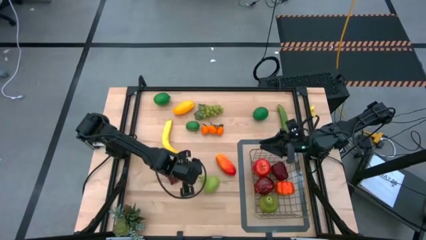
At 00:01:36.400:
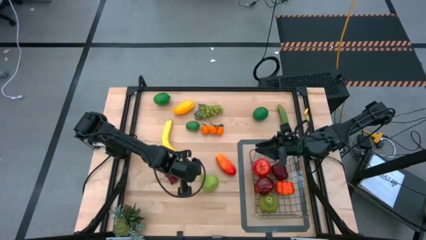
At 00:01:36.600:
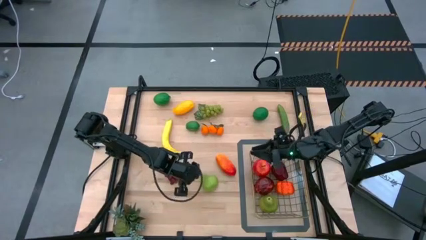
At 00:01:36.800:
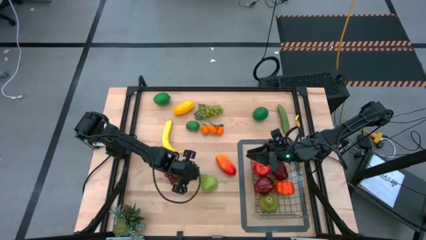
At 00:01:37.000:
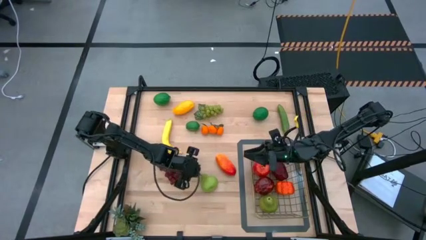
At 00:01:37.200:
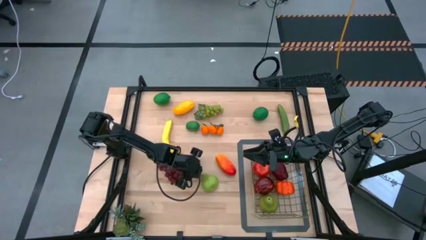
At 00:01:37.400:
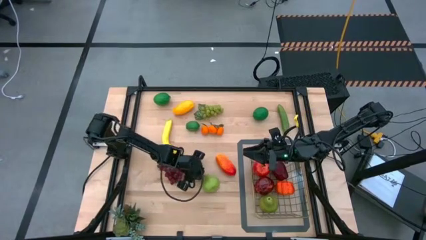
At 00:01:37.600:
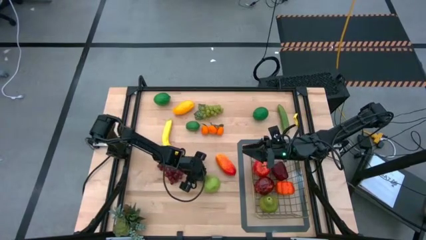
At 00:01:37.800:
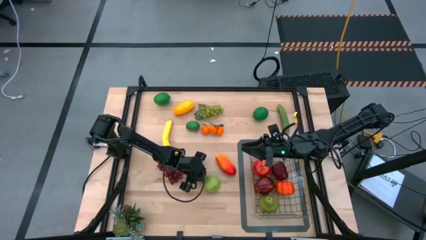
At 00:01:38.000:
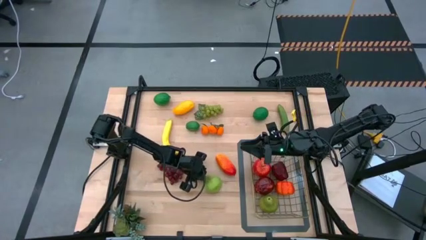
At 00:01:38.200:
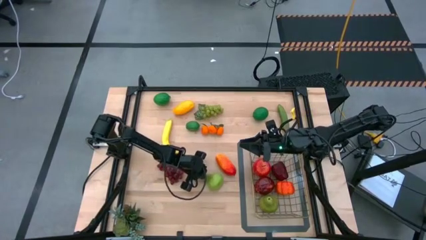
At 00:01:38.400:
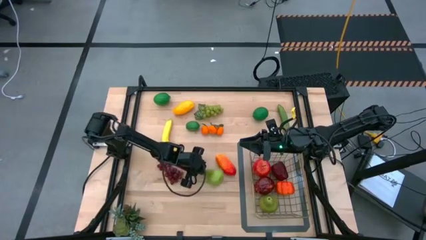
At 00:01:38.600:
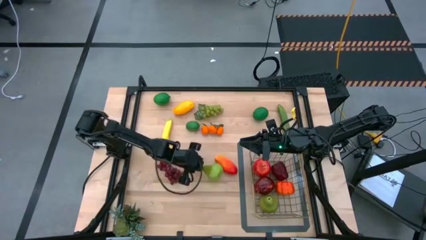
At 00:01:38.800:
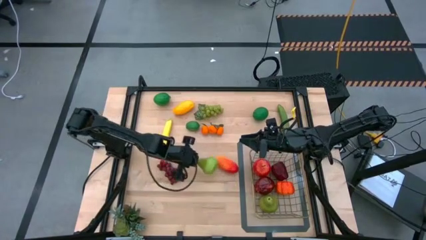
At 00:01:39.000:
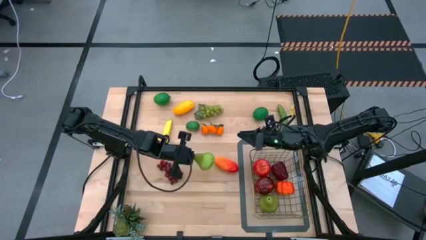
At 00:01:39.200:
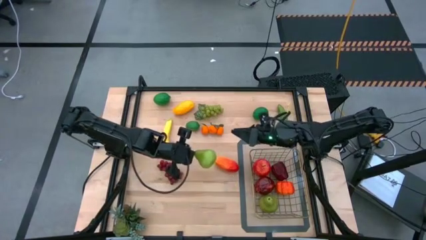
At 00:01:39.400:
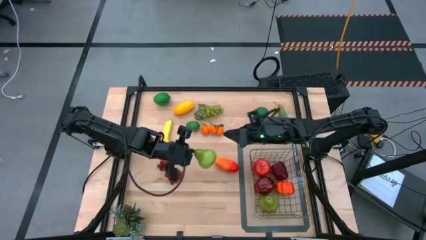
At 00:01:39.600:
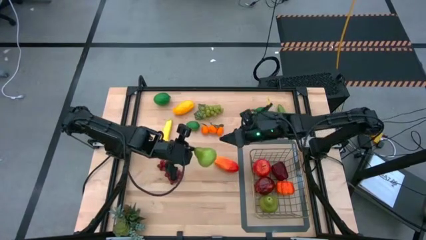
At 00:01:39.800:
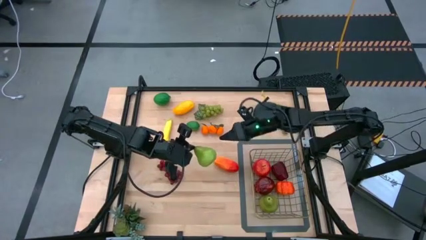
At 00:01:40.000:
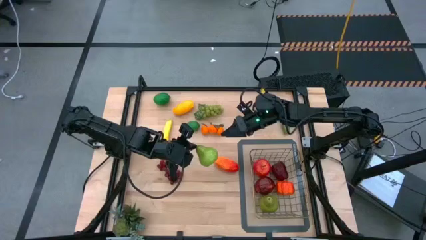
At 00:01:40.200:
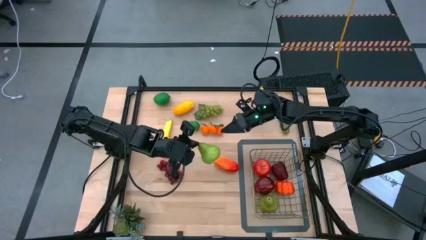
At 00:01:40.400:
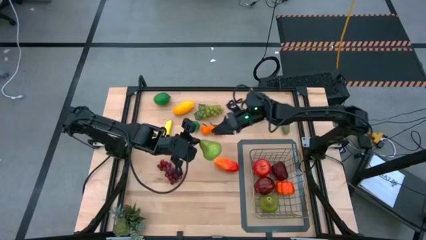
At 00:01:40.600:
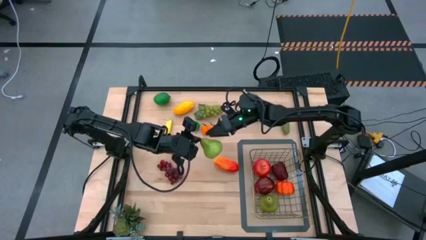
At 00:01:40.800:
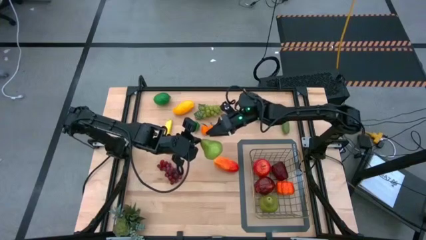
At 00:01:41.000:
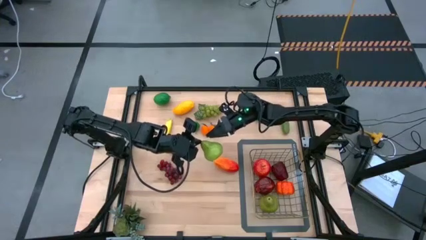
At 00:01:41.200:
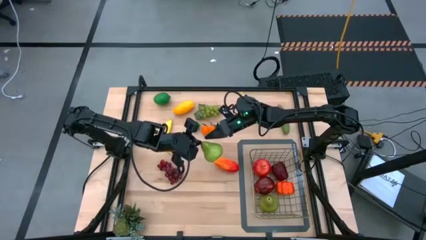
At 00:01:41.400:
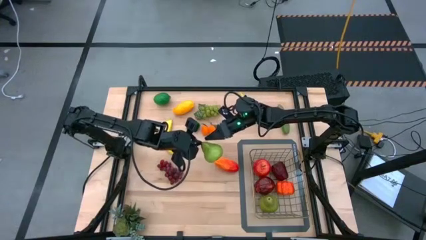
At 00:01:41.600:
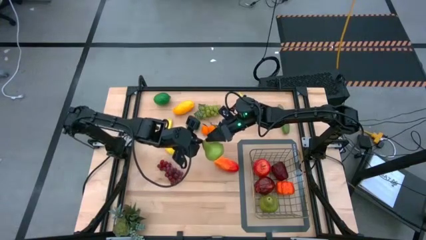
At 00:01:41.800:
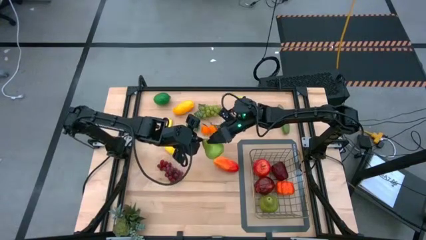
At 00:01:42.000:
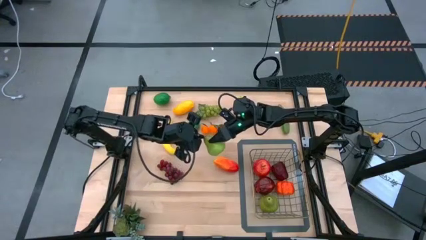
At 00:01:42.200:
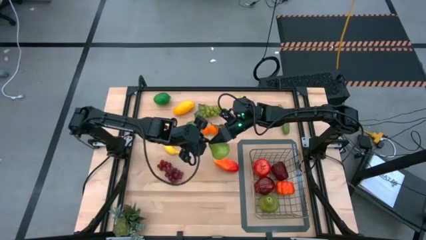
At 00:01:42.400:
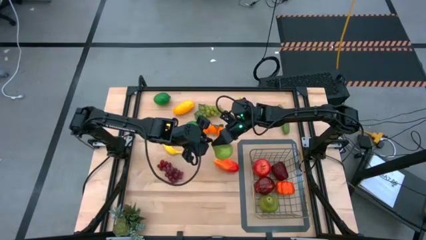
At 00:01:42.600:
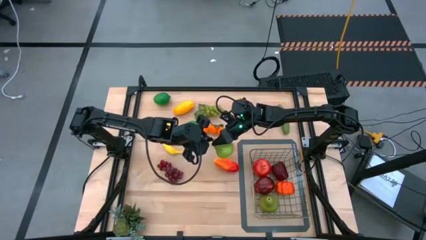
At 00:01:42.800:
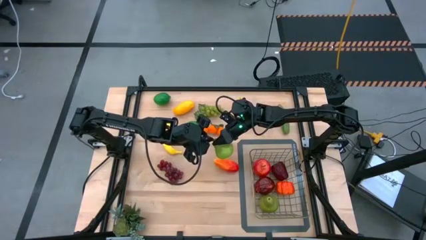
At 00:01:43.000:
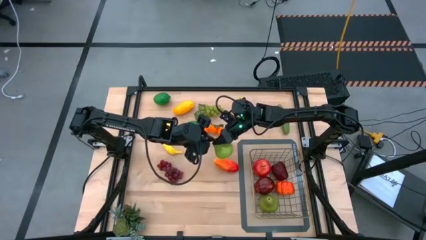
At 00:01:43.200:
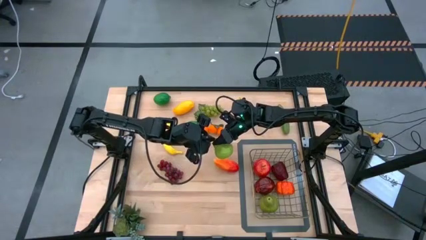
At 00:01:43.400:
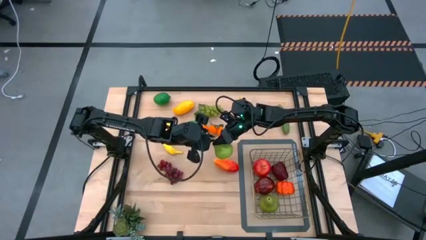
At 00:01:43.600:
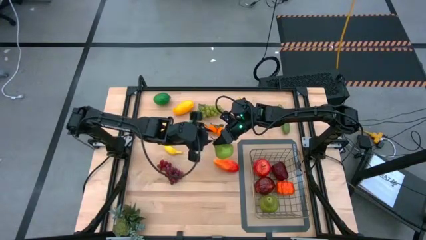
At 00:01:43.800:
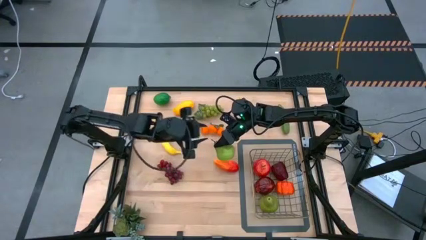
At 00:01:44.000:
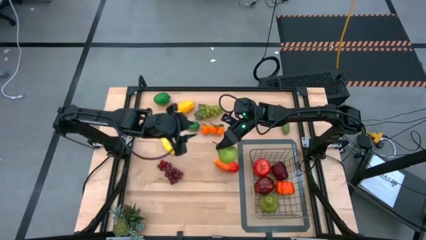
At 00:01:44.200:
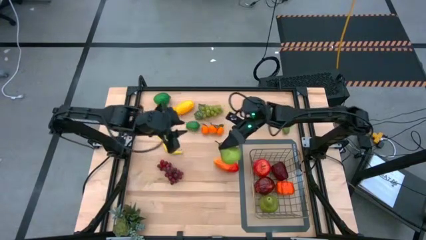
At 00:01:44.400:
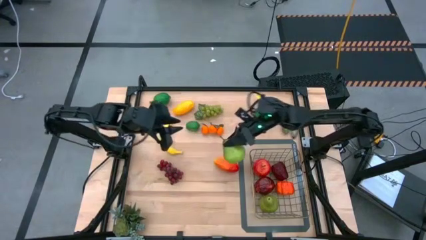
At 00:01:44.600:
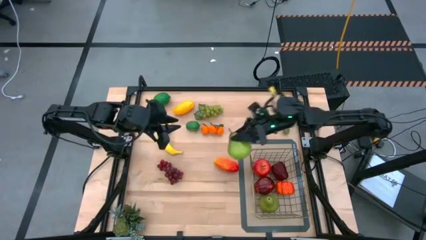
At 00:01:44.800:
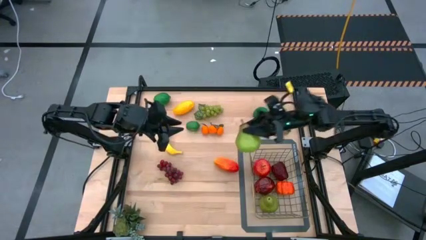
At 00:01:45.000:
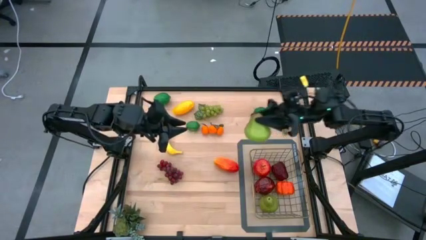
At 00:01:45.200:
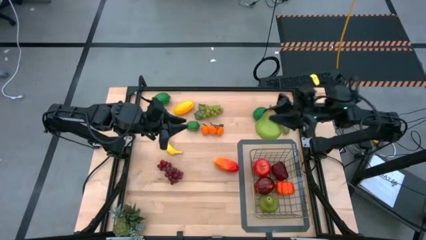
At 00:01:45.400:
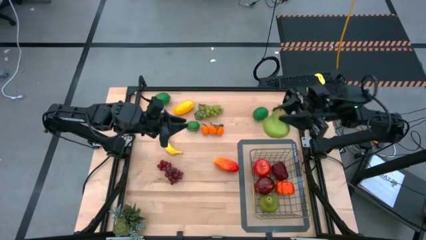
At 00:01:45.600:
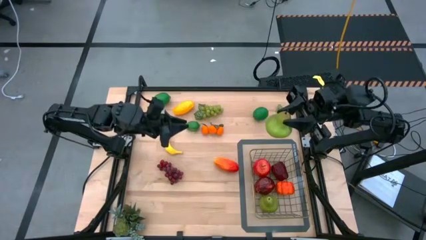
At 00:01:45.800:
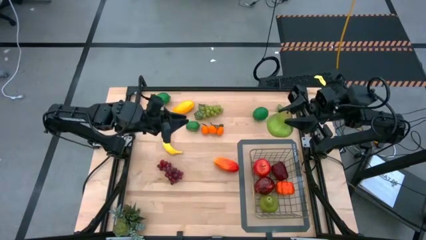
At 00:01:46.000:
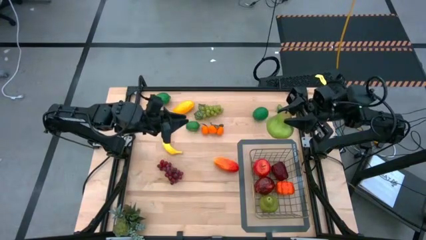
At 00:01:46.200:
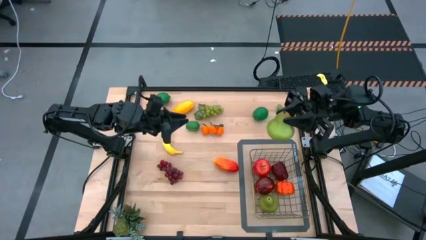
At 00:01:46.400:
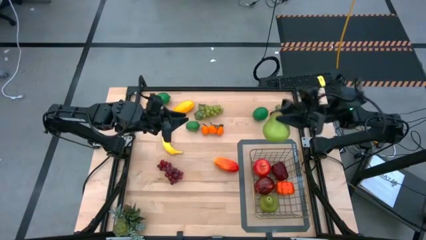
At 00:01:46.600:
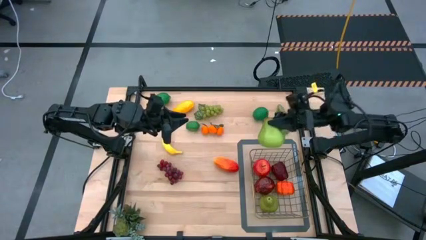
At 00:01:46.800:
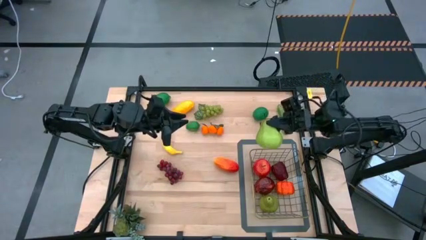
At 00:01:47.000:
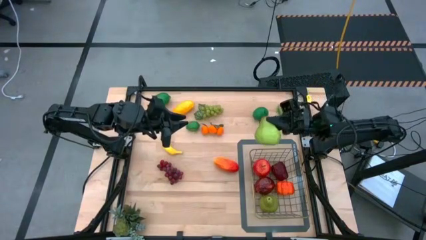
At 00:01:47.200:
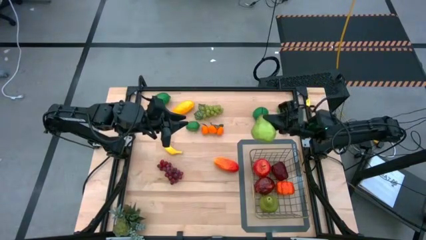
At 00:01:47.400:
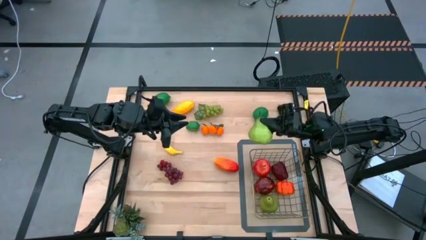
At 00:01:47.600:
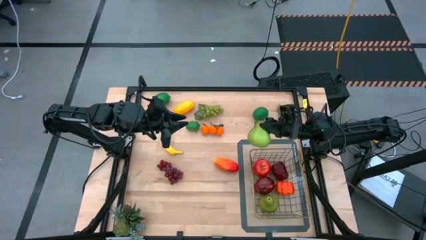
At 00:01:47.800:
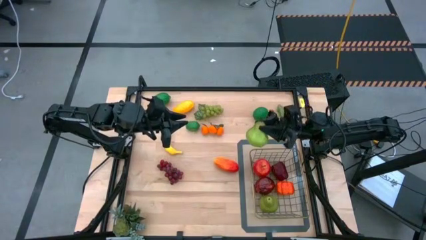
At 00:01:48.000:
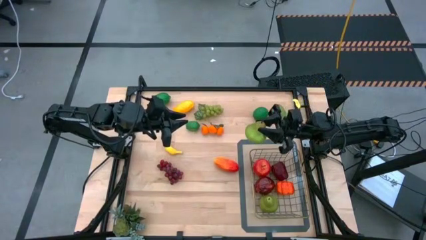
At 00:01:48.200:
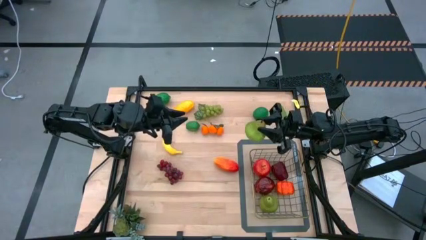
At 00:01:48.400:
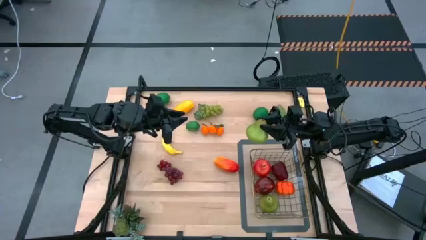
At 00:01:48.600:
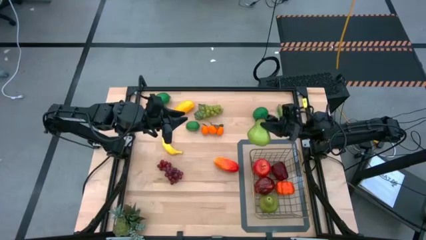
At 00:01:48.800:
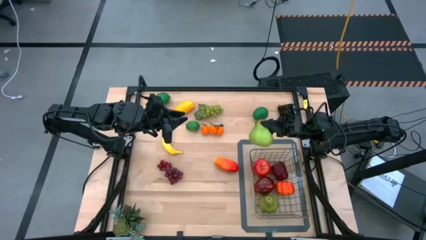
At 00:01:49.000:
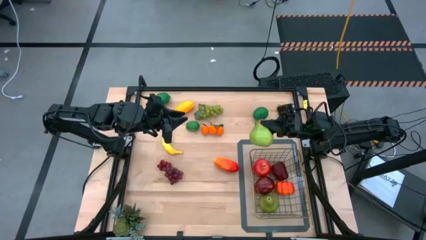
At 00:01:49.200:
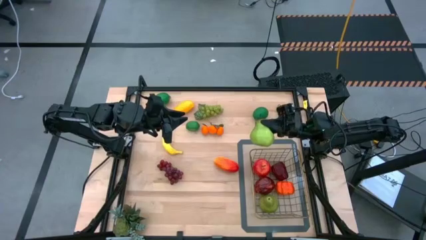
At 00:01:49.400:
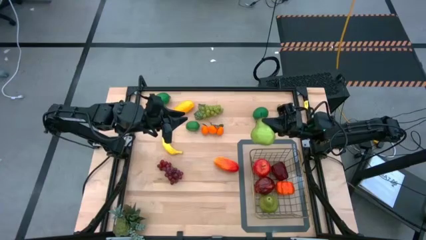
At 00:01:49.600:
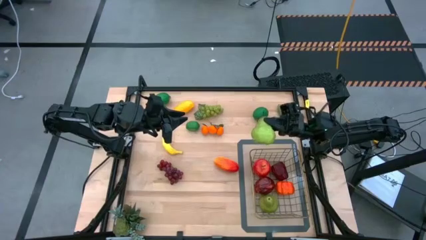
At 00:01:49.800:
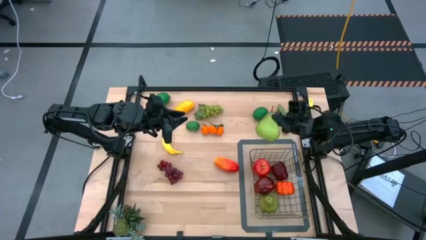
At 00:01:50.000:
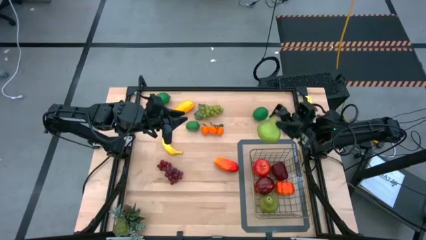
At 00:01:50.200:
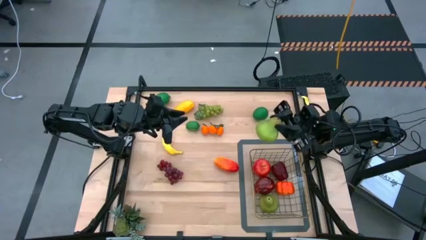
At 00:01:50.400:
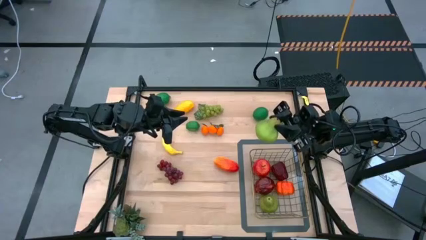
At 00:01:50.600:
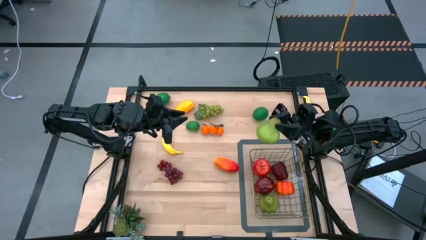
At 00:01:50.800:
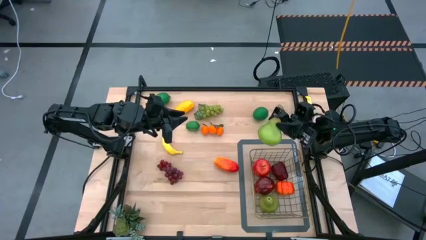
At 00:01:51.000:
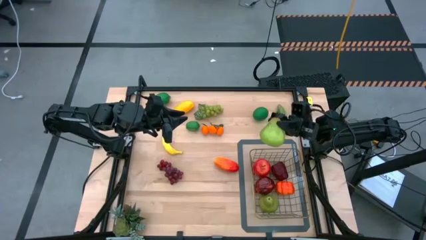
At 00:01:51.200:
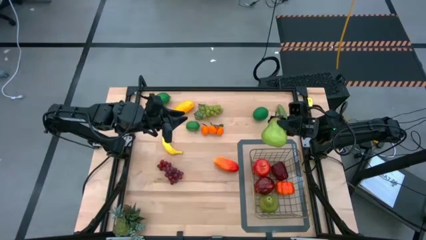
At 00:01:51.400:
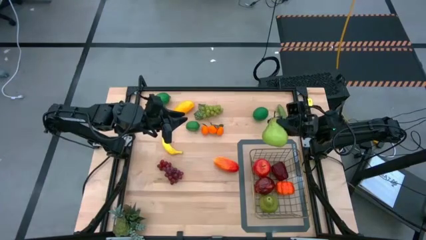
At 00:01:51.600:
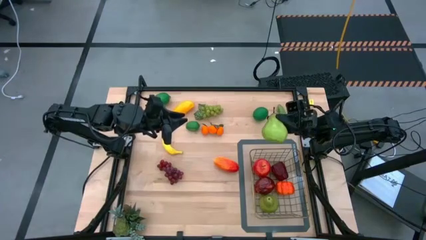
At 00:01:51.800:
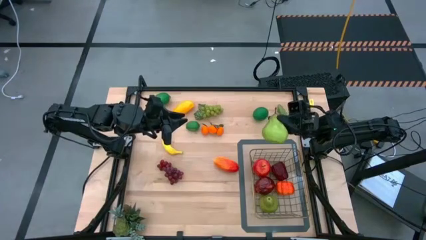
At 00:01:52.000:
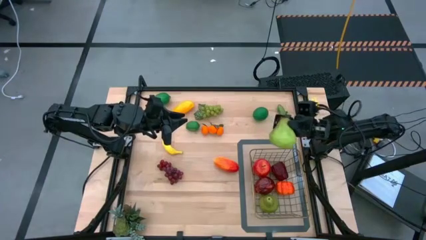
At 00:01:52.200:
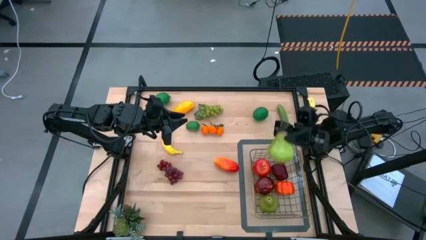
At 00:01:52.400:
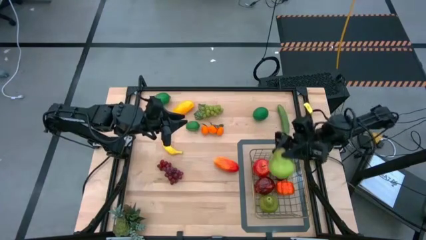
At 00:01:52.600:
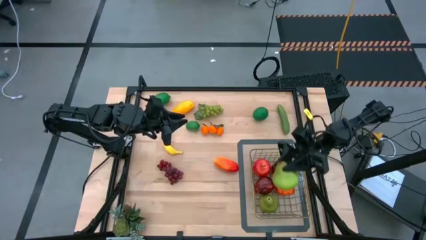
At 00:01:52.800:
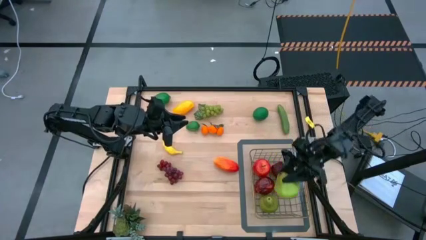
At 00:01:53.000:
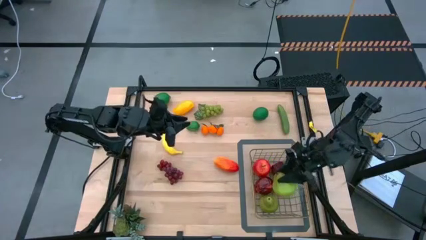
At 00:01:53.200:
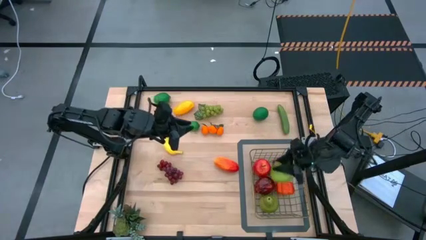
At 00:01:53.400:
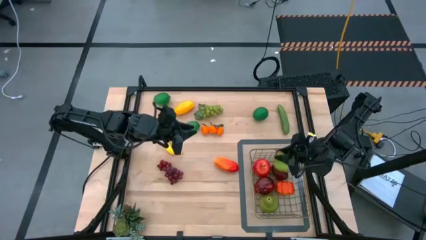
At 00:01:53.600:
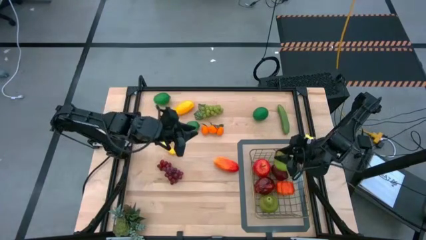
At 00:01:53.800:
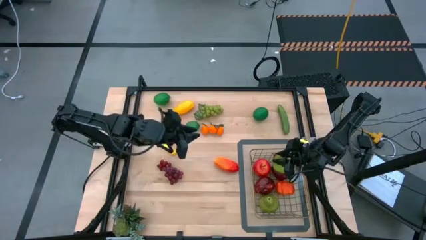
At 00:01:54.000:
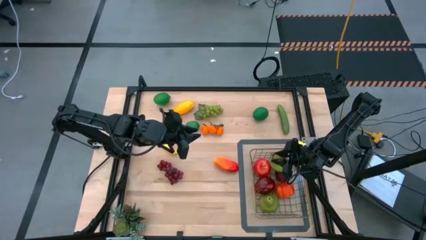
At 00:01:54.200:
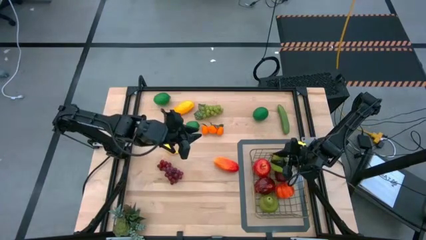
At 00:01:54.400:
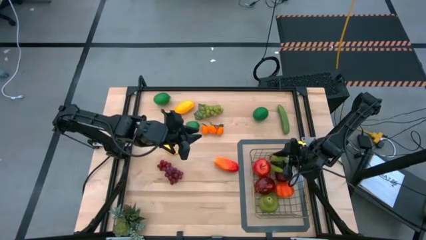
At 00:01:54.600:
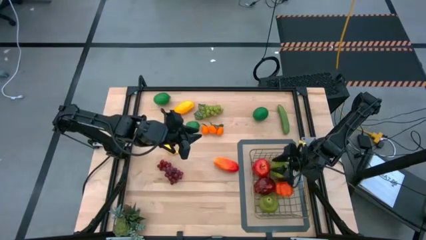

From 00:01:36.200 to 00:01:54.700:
Task: Build produce basket
Put the green pear into the wire basket
